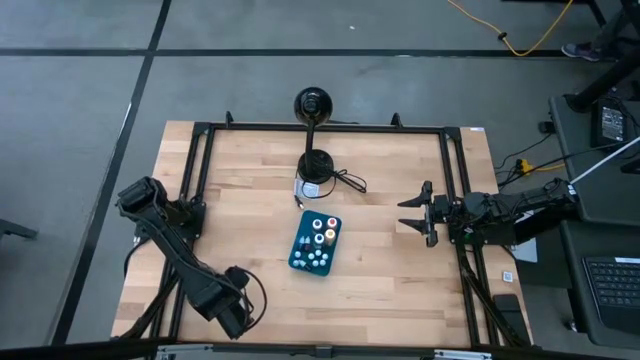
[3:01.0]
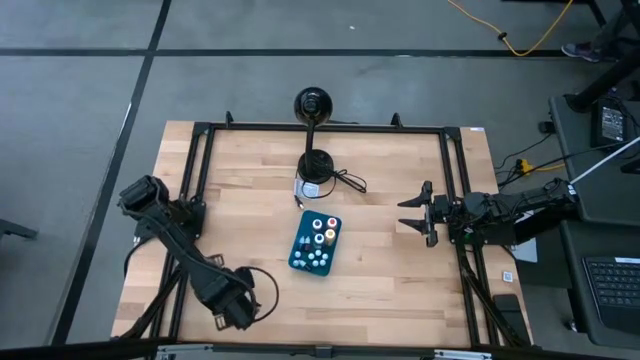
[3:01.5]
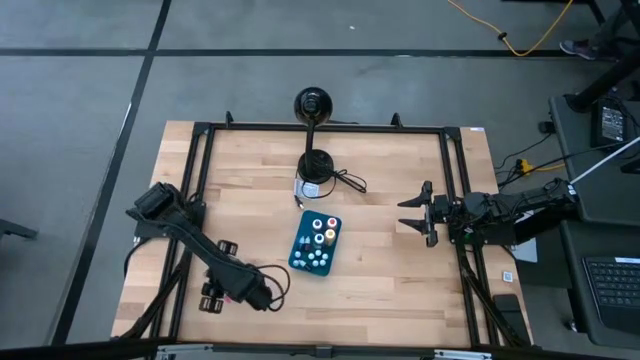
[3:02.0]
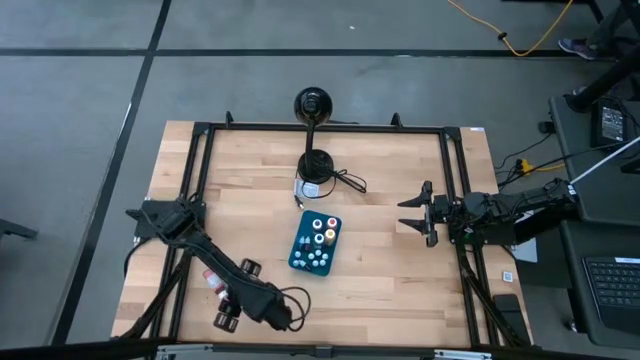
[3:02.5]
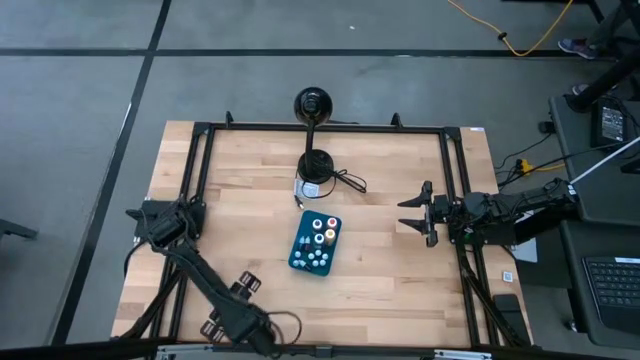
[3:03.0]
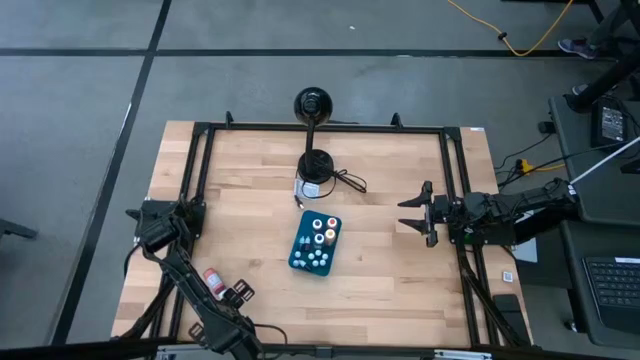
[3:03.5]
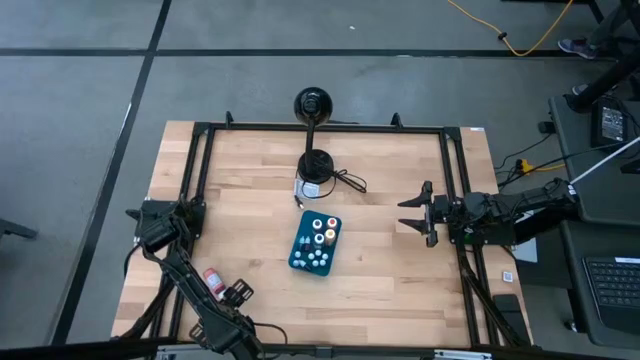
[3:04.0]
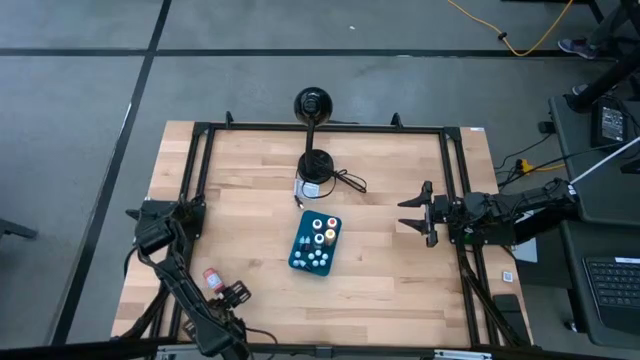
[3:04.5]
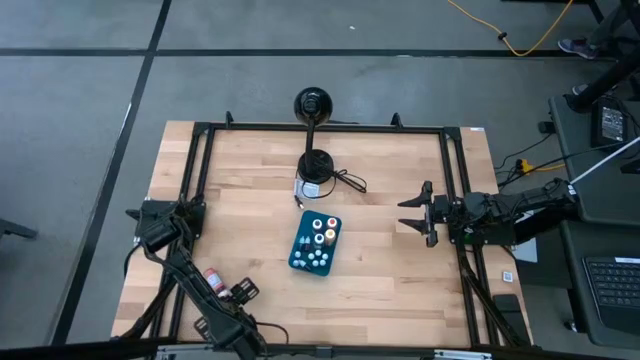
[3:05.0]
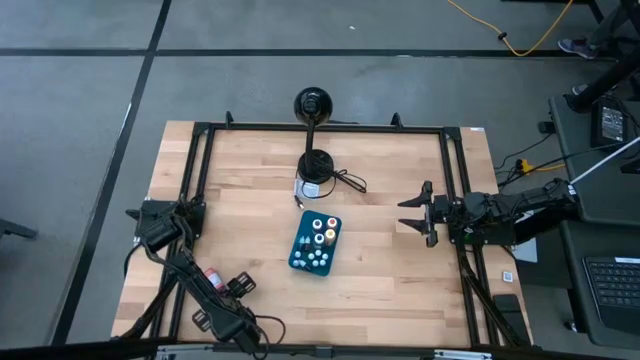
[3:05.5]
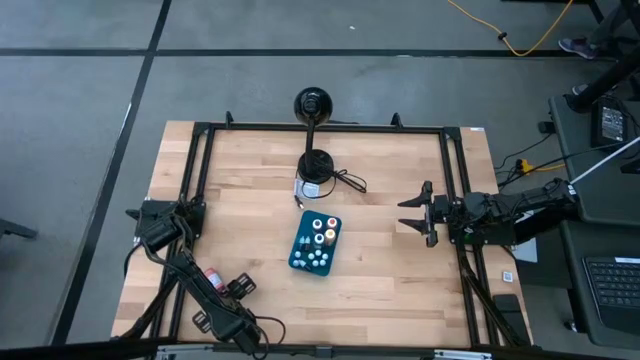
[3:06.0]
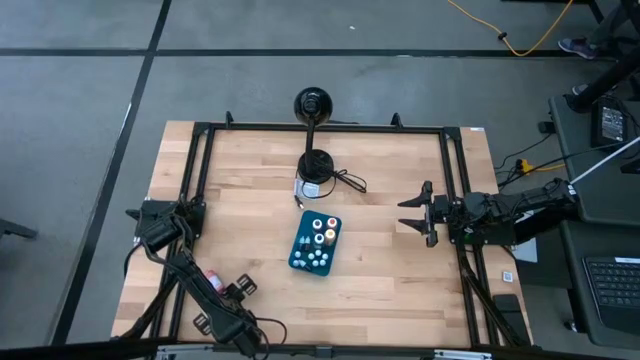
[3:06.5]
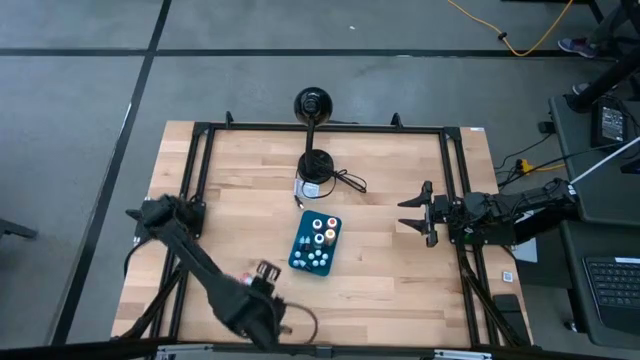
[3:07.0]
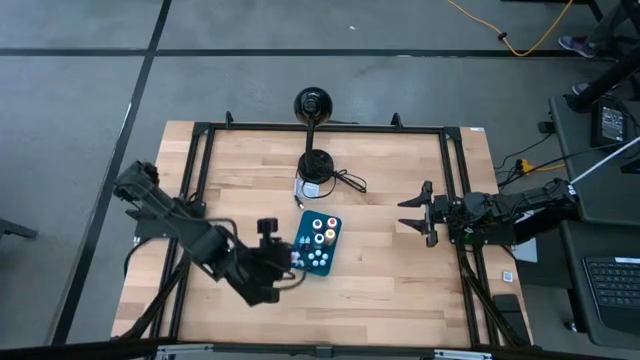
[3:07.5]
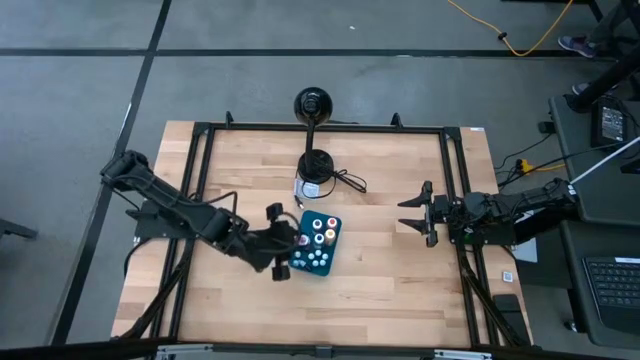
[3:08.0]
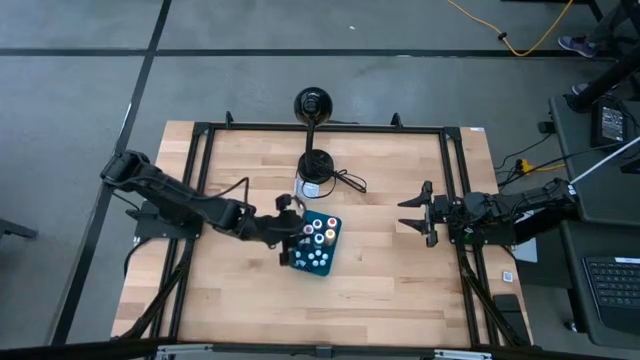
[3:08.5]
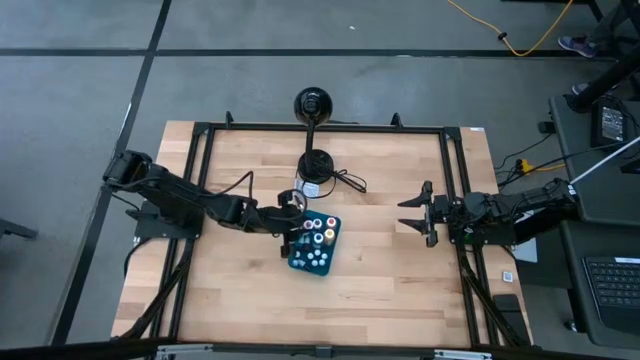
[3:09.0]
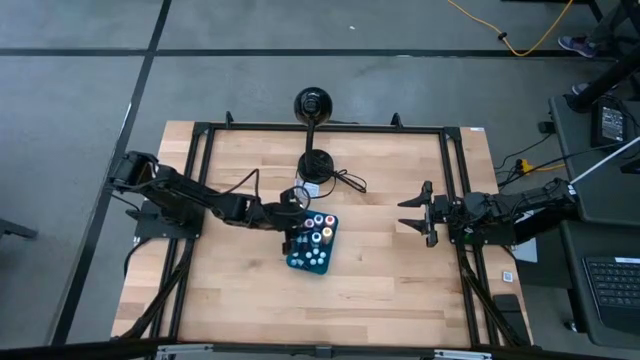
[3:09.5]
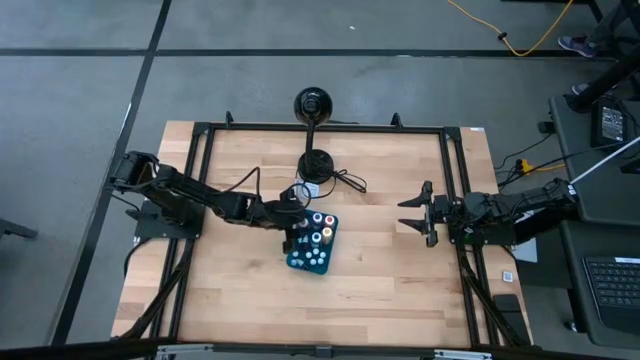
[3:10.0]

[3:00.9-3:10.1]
Task: Pick & Place food coloring
Put the pink big food coloring bottle into the bin

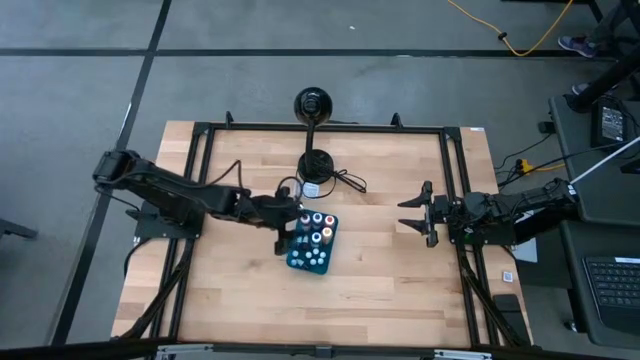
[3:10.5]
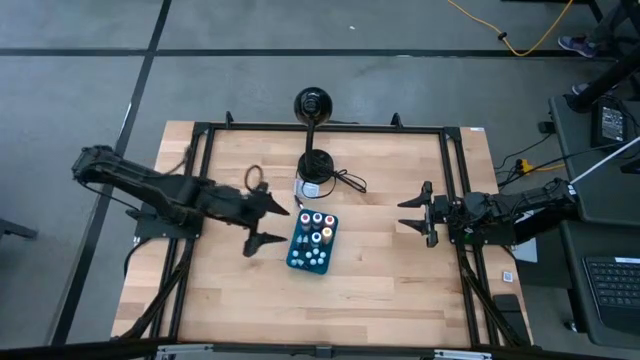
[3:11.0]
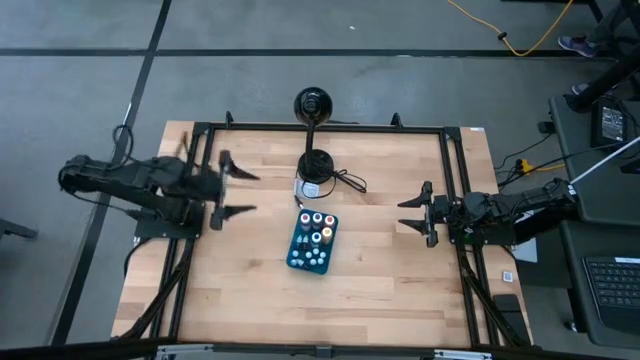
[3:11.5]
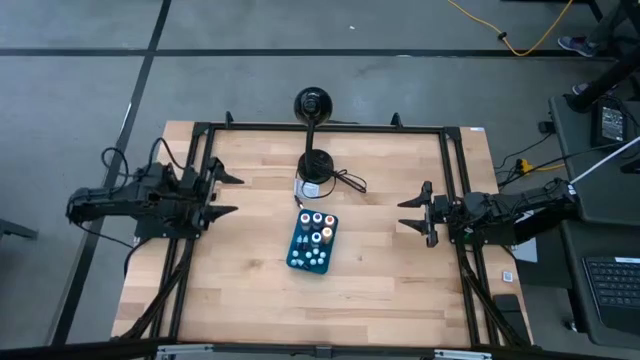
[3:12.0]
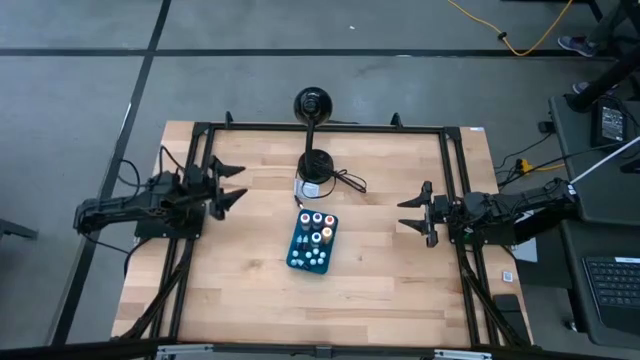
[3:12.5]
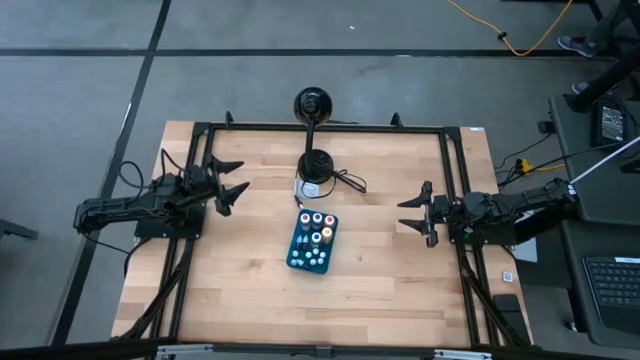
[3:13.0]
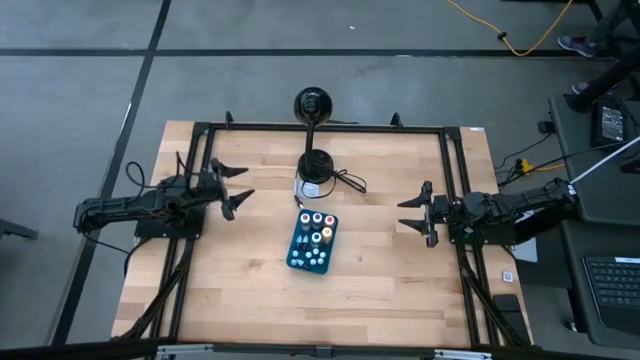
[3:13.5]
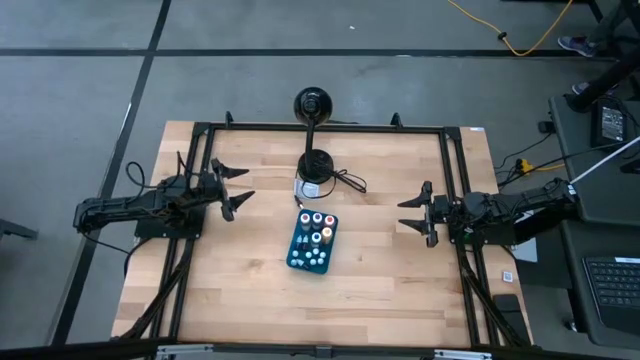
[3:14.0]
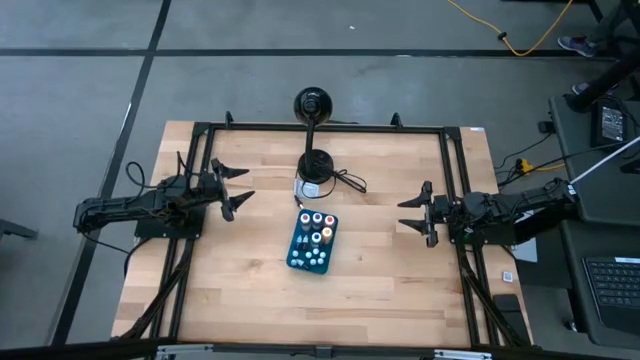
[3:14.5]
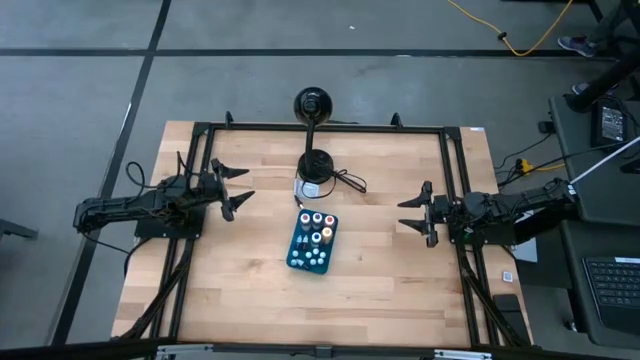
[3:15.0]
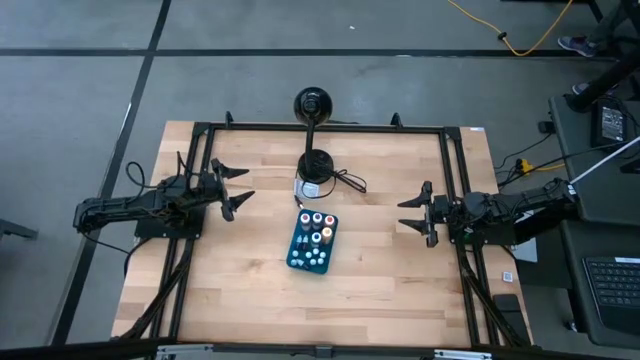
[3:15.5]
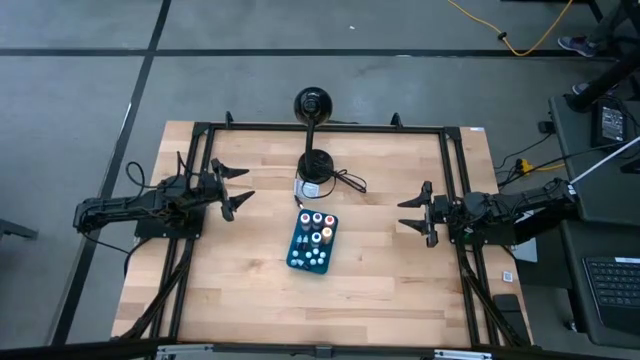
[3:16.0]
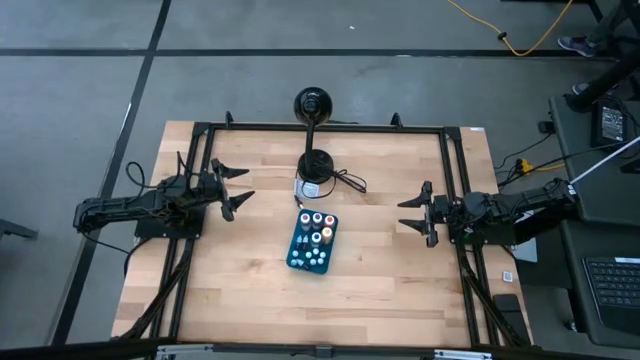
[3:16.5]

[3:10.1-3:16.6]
Return to Home Position

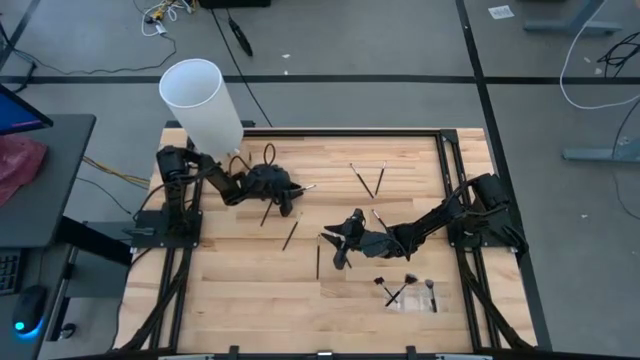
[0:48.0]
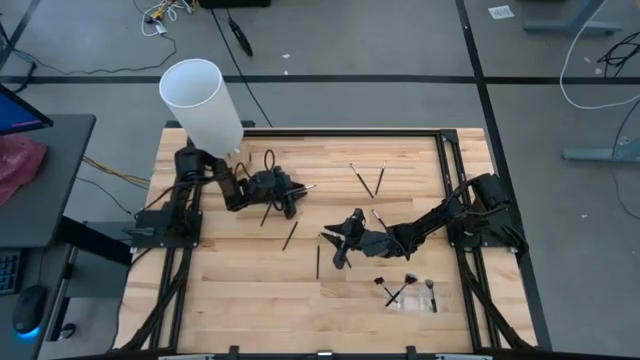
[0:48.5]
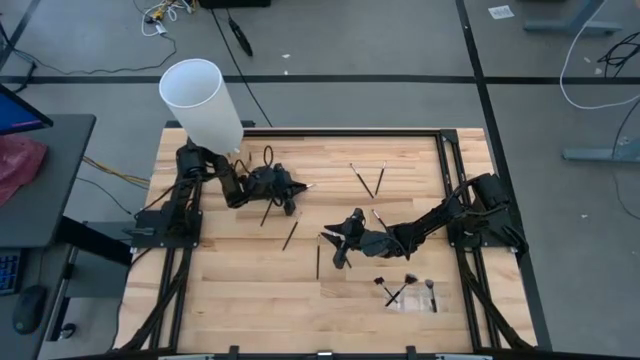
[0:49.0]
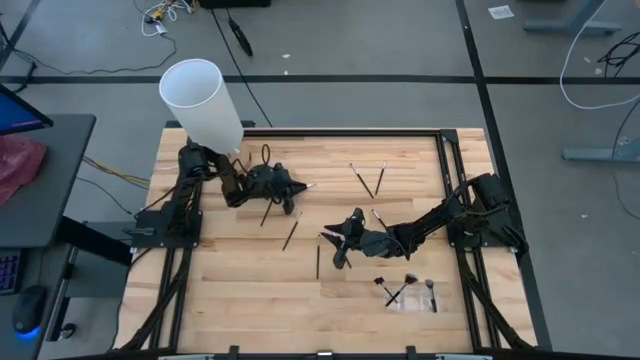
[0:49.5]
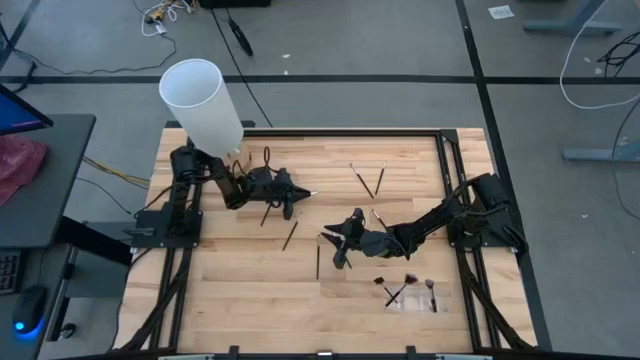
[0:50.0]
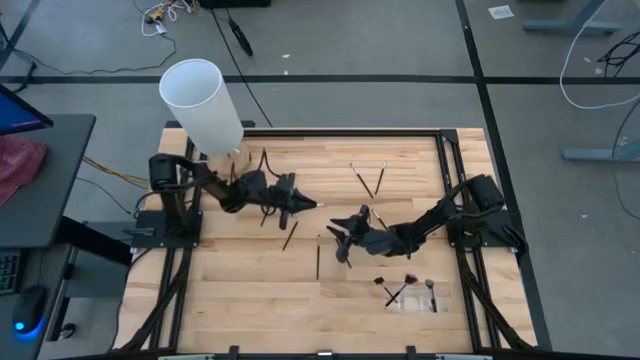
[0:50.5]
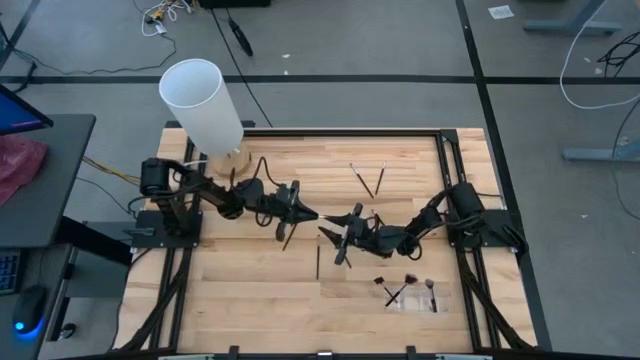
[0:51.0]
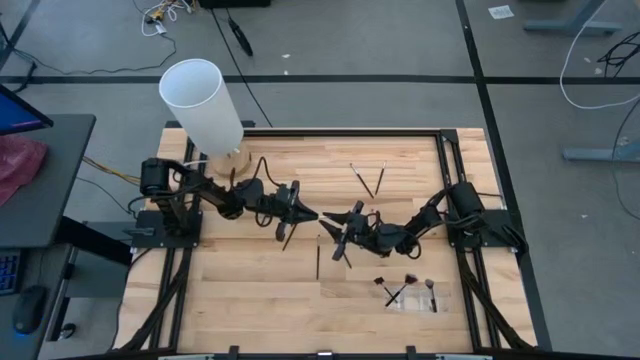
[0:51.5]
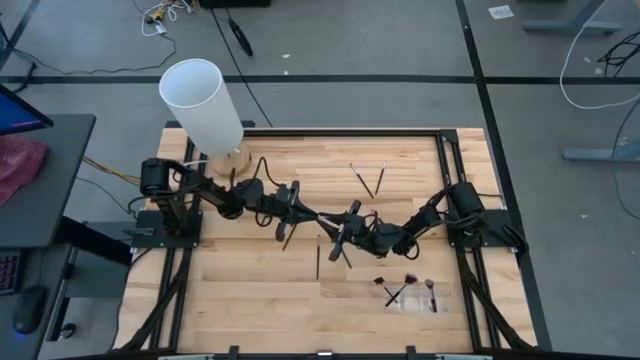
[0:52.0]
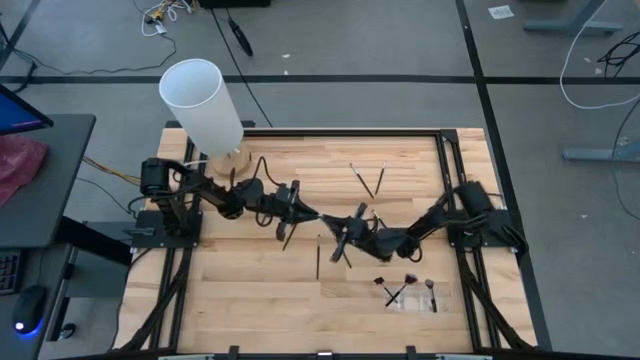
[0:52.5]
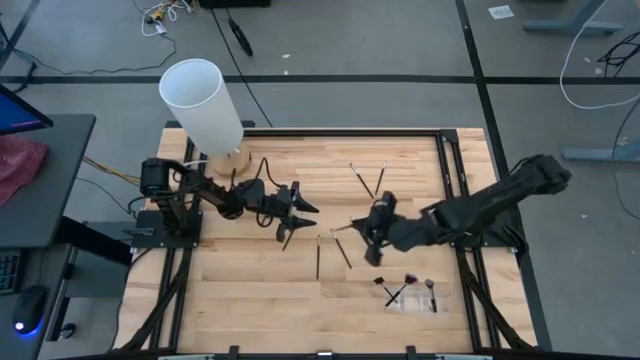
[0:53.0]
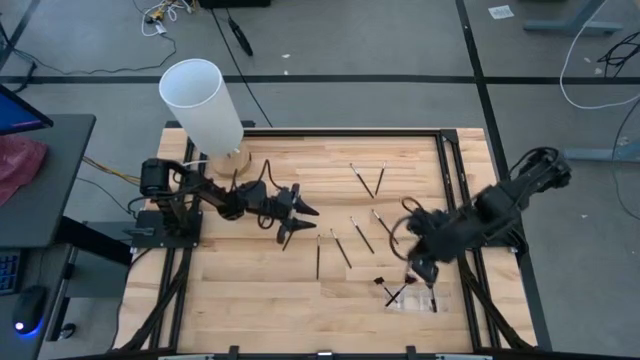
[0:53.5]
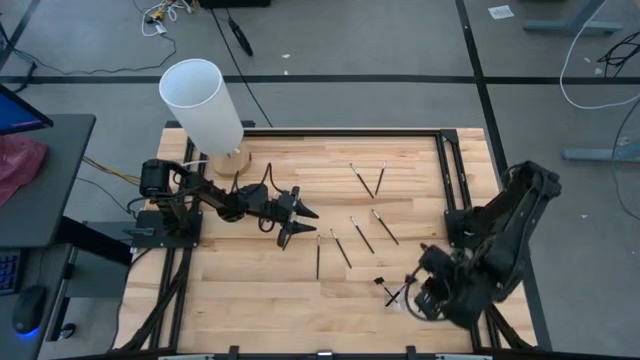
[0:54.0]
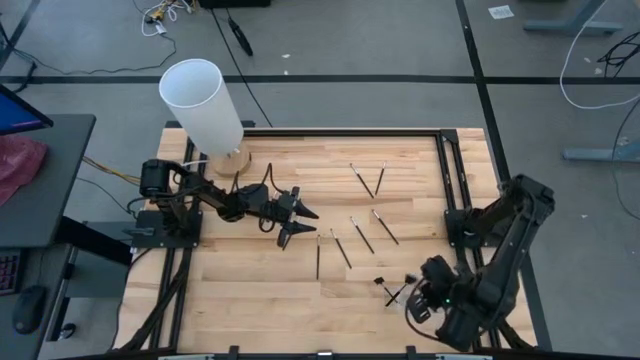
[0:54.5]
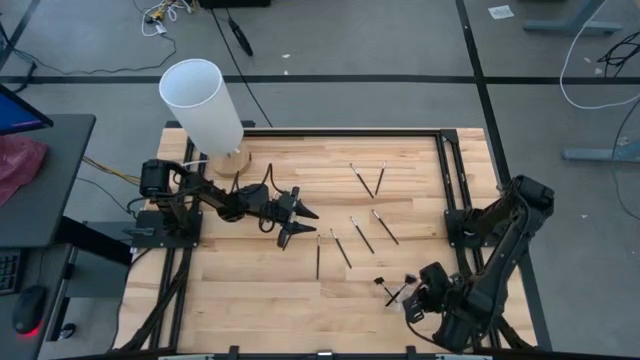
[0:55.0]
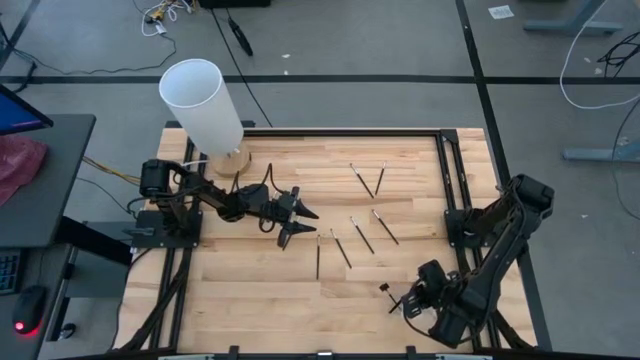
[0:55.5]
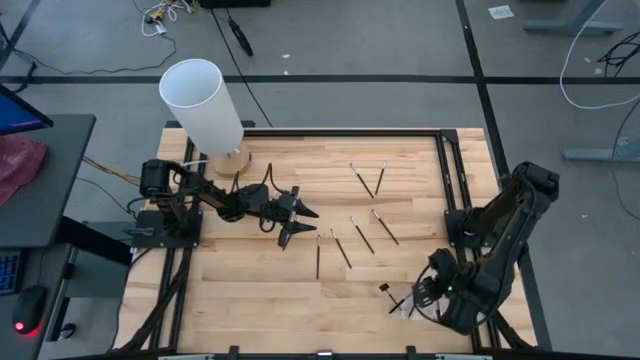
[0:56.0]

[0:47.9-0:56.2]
Task: Pick & Place Makeup Supplies
Put the silver makeup brush into the transparent organizer
